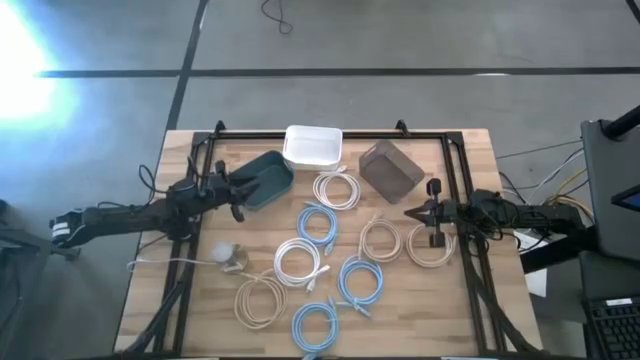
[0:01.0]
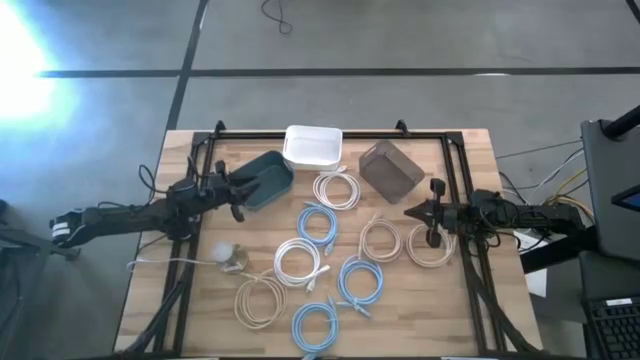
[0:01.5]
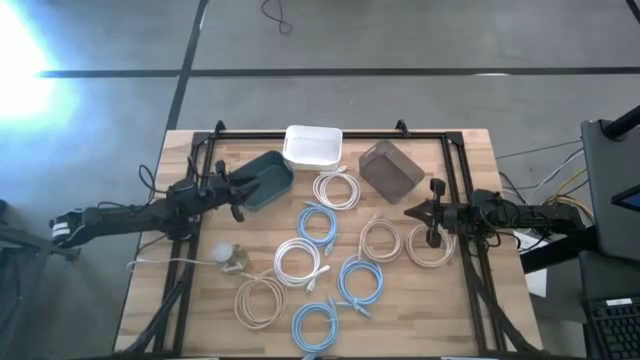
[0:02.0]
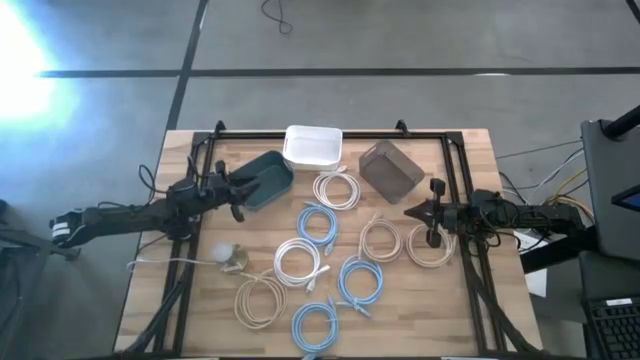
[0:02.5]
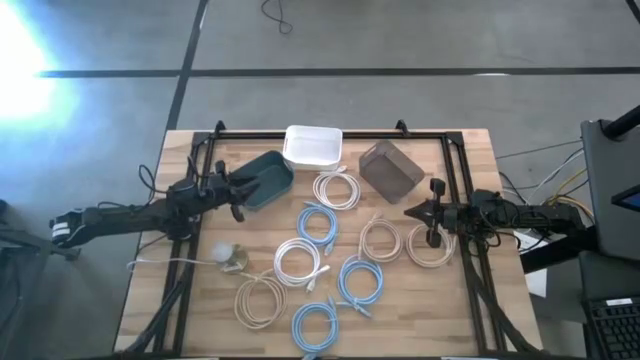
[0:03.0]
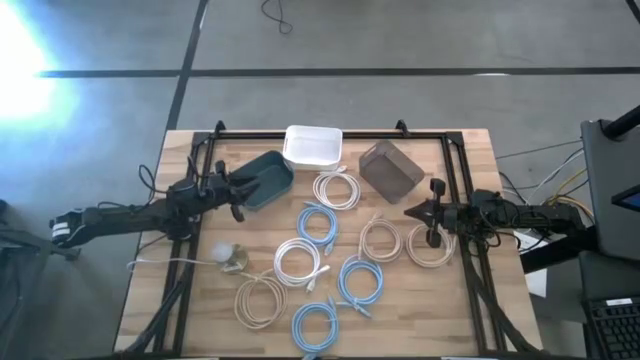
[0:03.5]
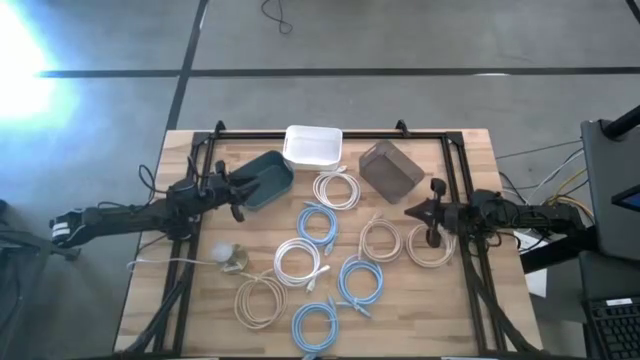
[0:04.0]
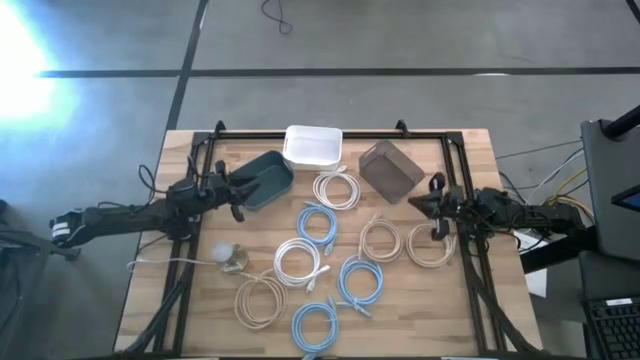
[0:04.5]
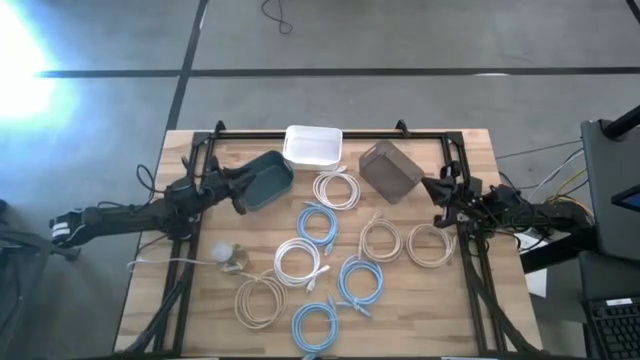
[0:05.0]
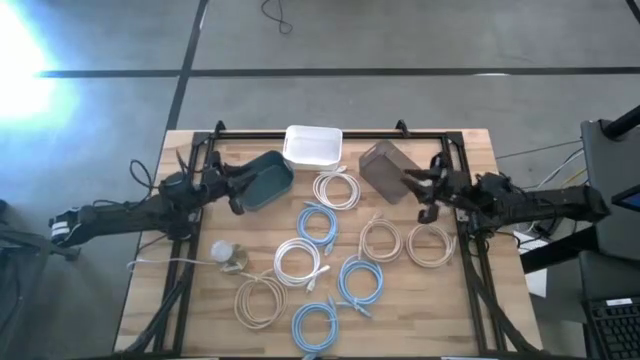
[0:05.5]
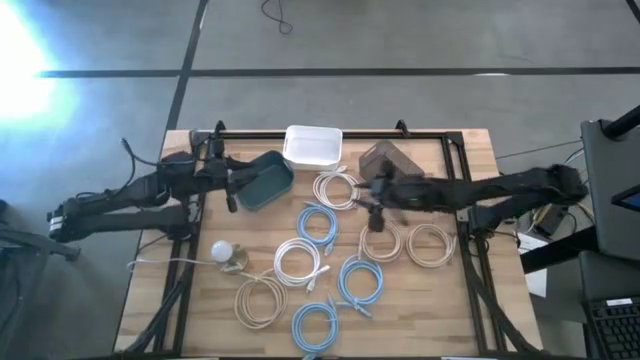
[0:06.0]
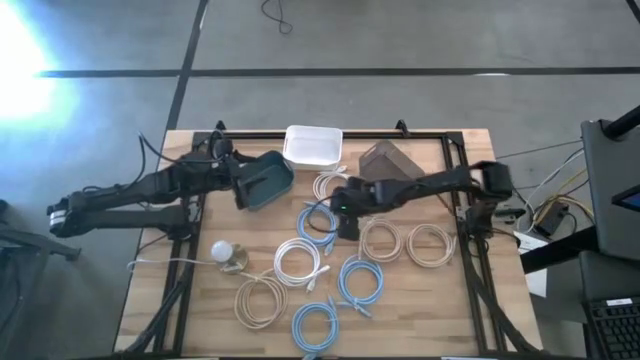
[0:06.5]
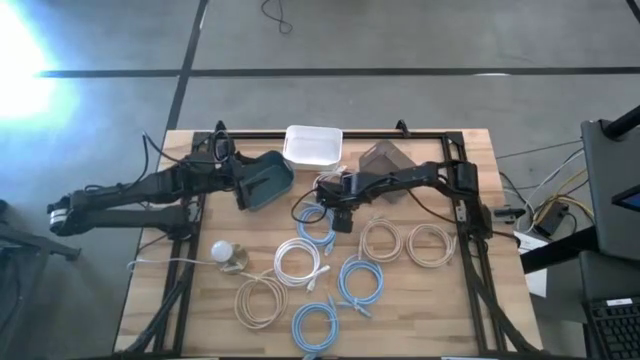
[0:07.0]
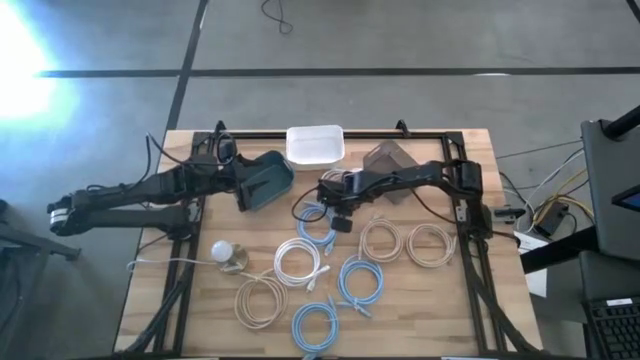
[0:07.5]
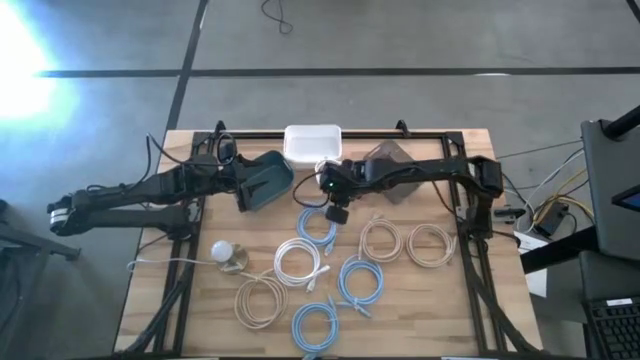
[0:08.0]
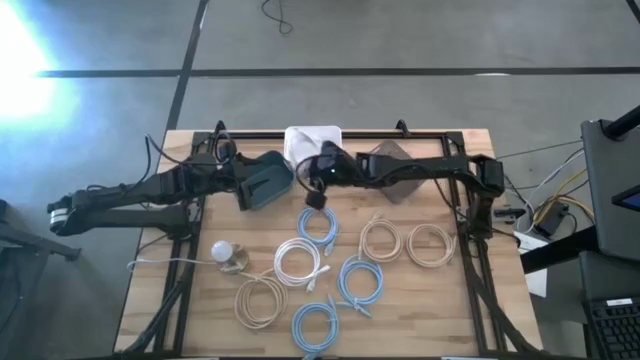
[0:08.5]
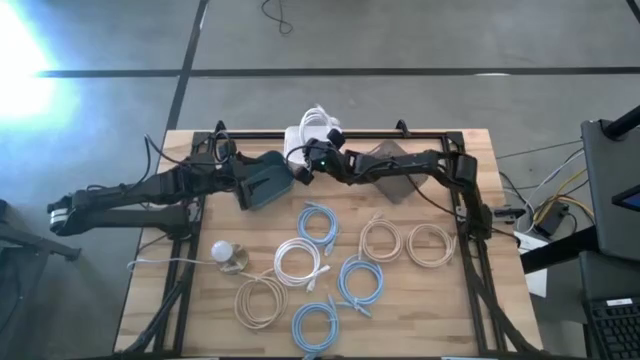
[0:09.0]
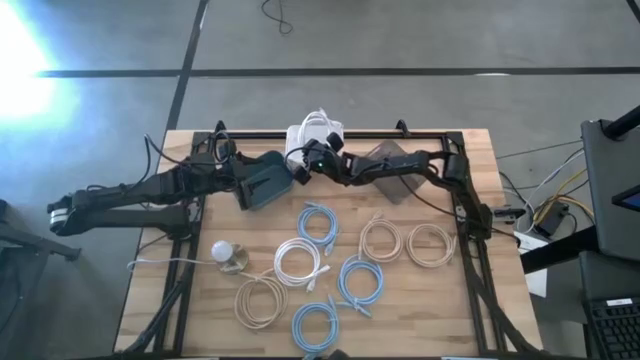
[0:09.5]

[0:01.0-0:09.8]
Task: Sort HDMI cables
Put the top white HDMI cable into the white bin

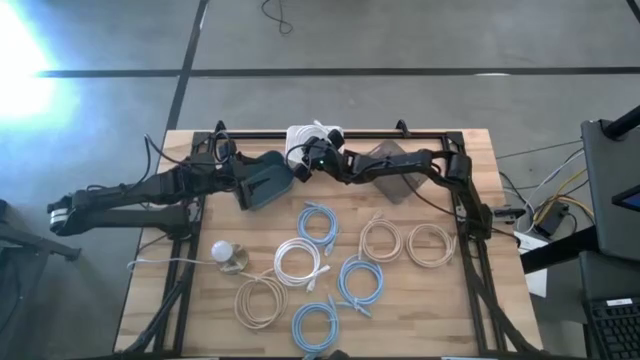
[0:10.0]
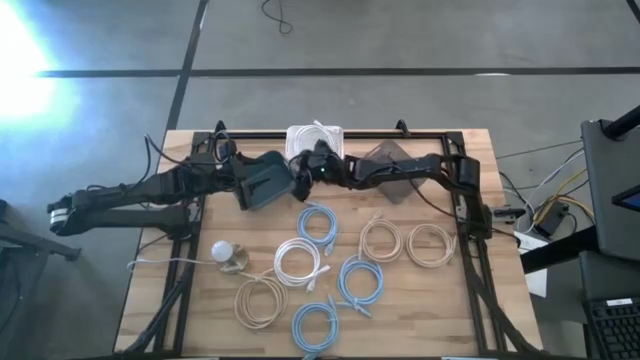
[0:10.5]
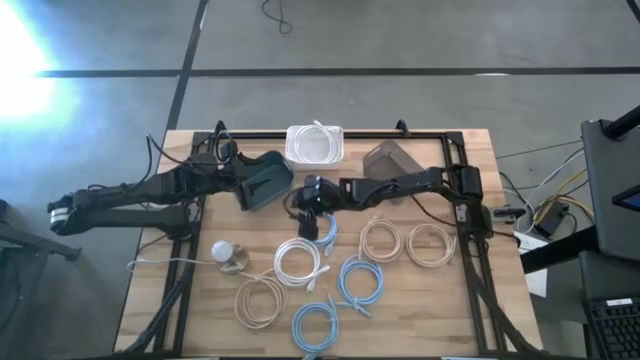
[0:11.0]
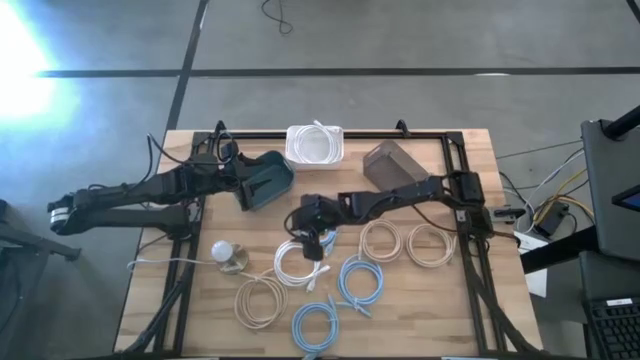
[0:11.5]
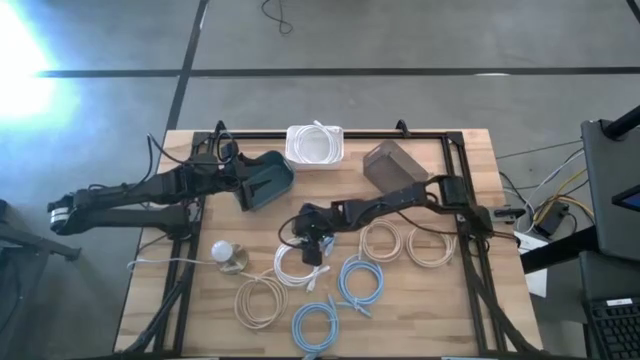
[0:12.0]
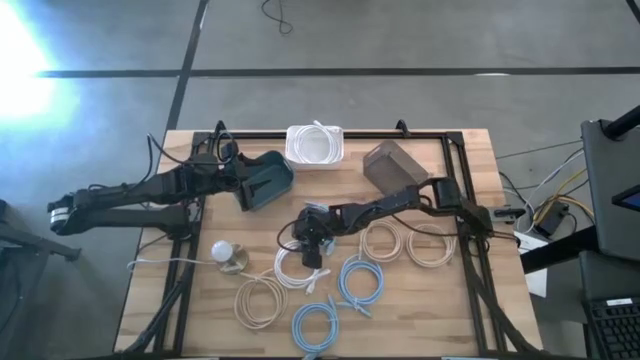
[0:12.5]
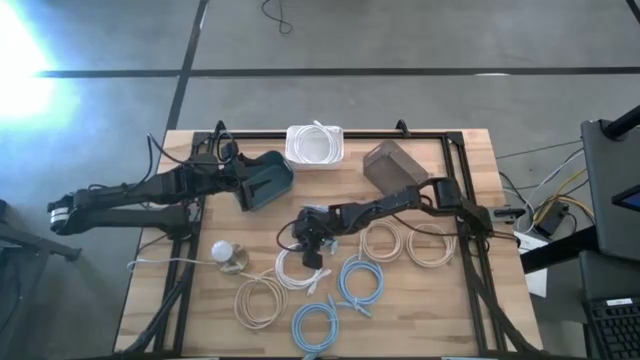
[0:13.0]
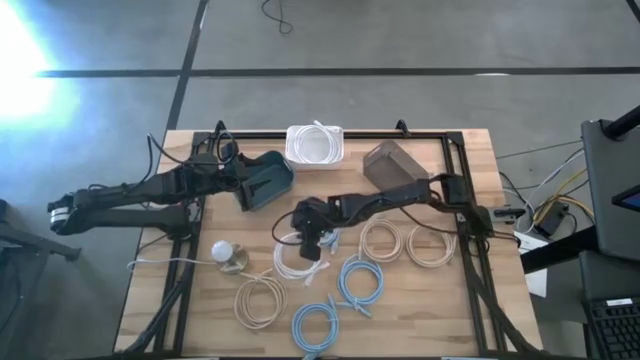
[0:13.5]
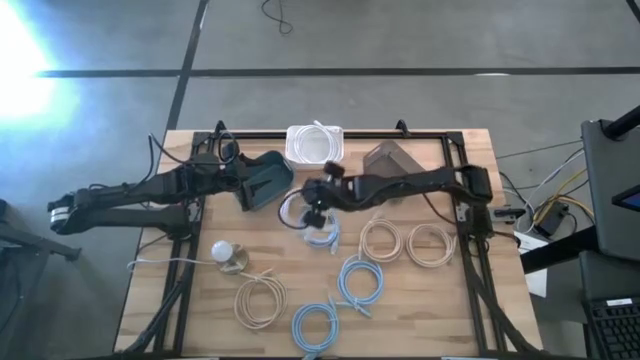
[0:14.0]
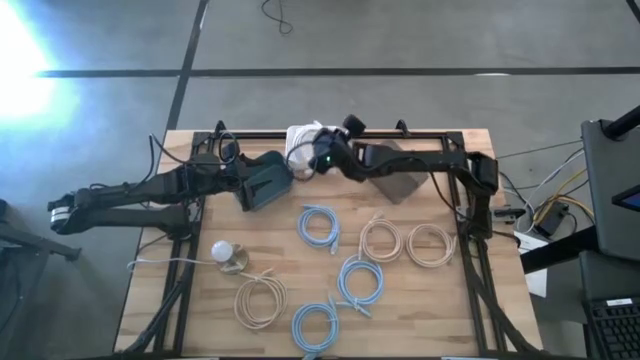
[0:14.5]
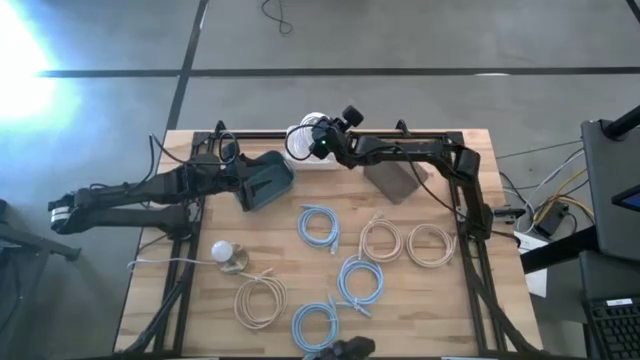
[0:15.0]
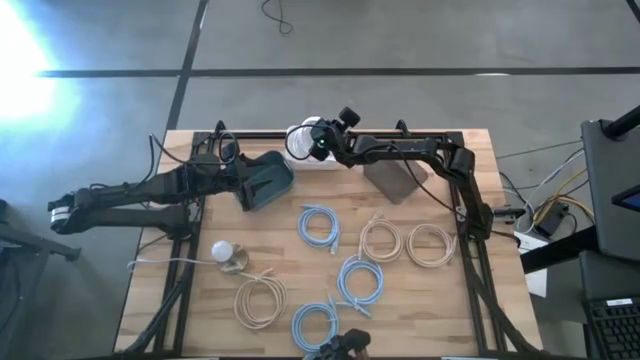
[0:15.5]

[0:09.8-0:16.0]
Put the white HDMI cable into the white bin

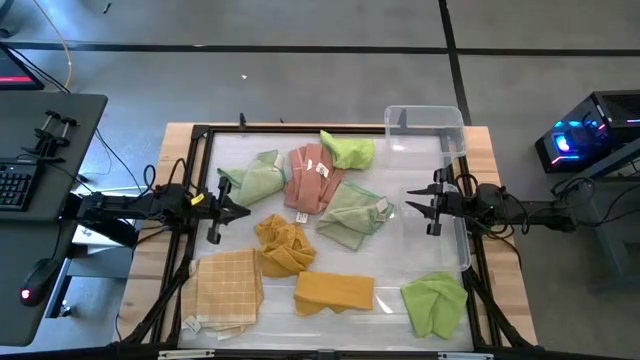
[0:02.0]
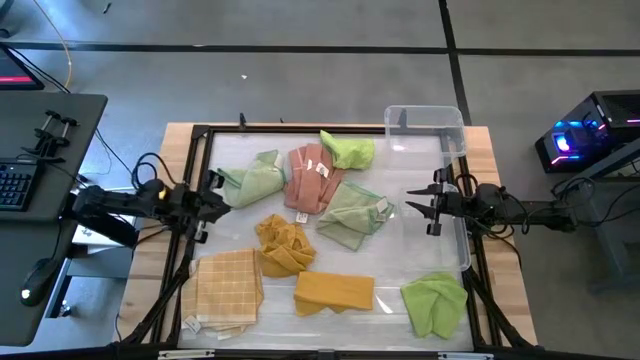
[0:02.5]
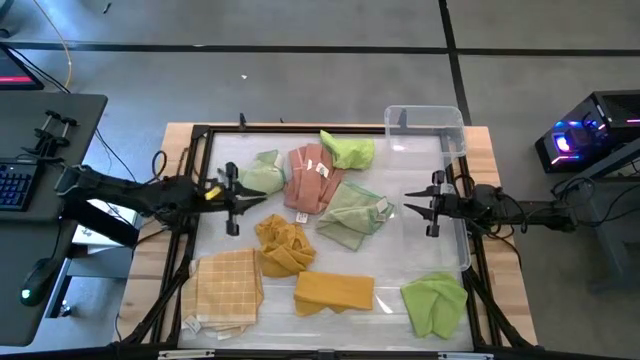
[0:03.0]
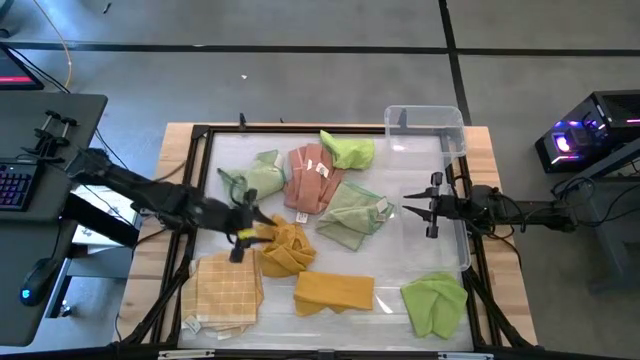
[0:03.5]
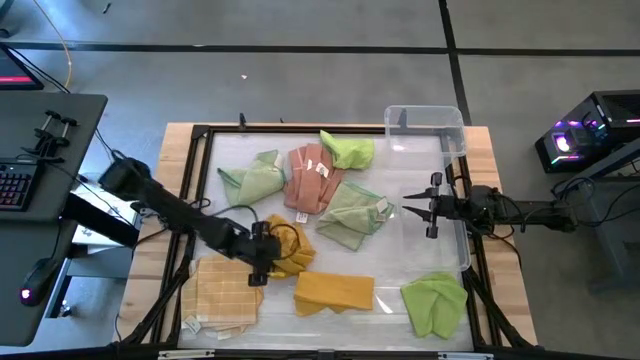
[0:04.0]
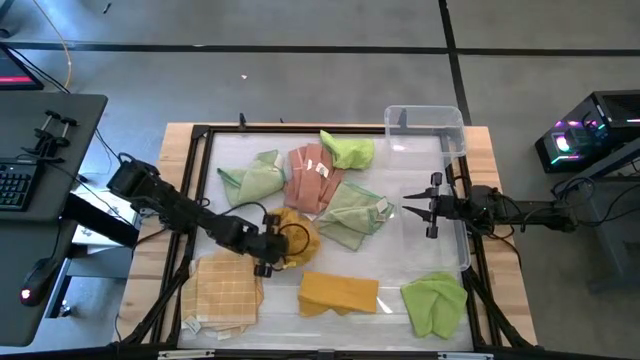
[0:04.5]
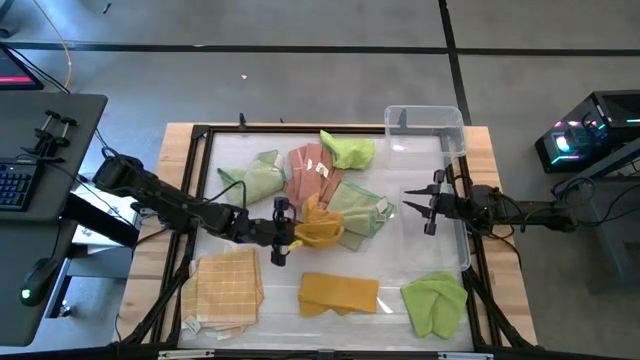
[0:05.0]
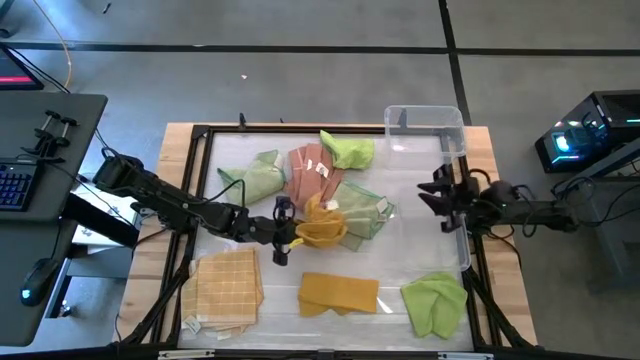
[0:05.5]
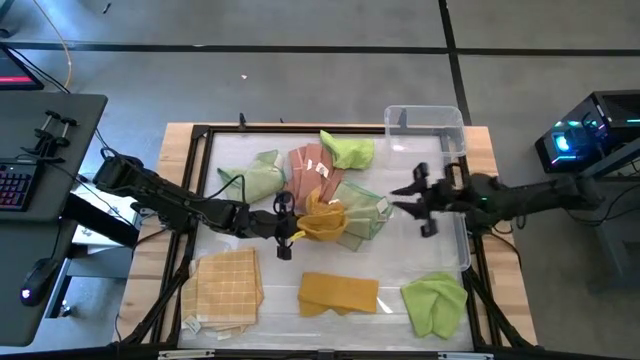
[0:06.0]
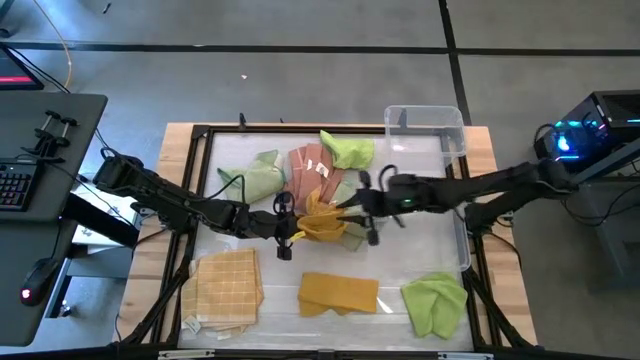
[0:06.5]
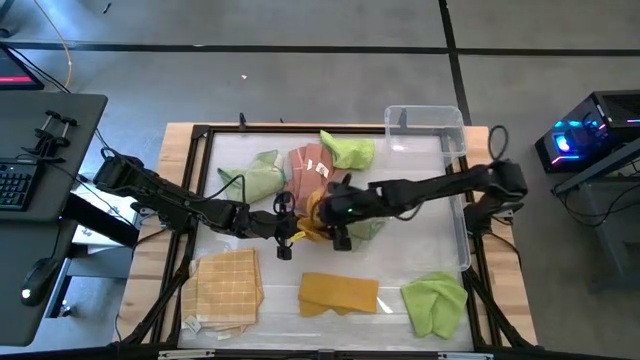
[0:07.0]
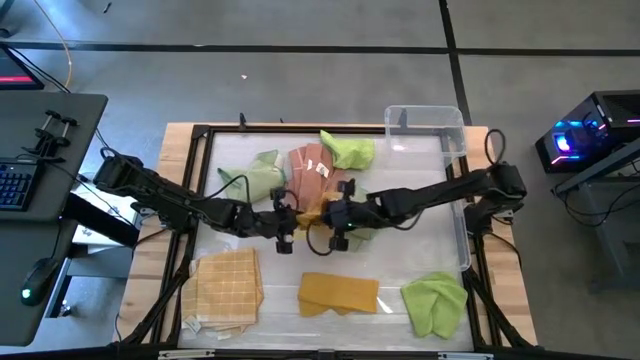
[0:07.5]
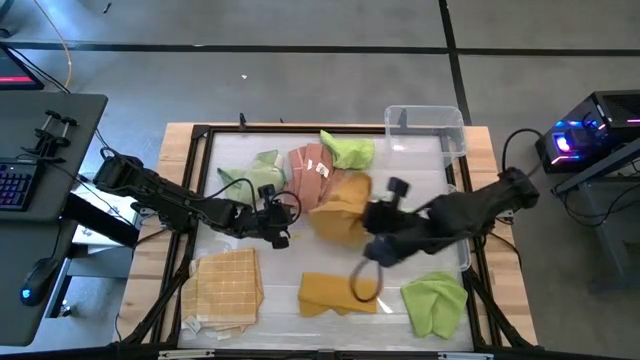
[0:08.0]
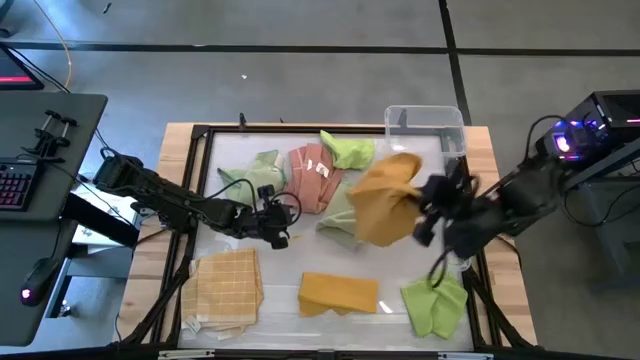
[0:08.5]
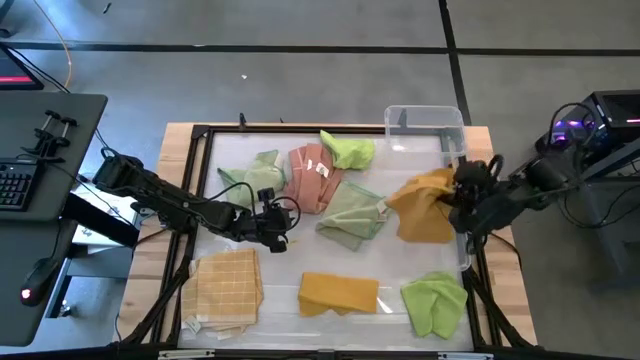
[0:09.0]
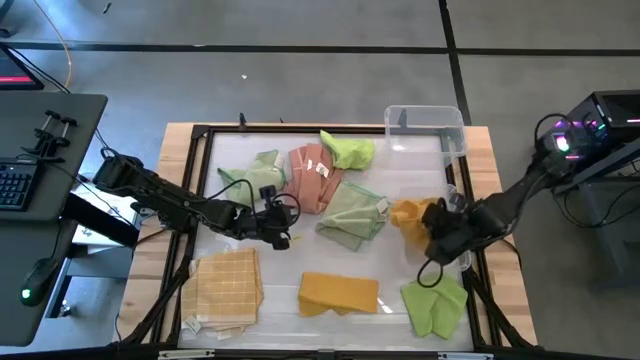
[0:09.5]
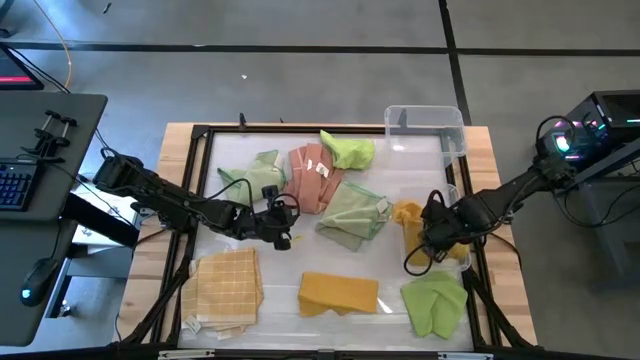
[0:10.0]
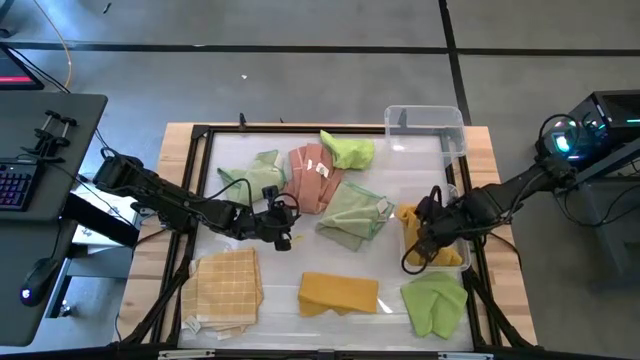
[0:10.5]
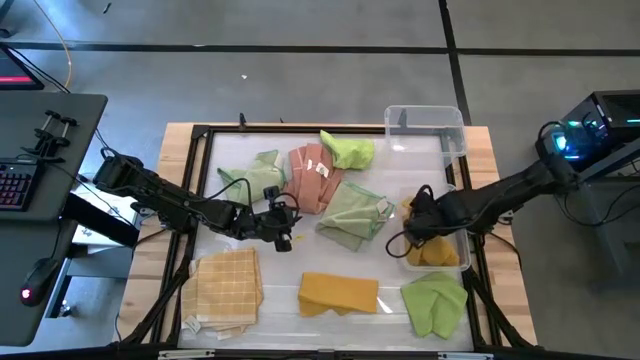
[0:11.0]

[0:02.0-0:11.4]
Task: Sort towels by color in basket
Put the top yellow kitchen towel into the bottom transparent bin
